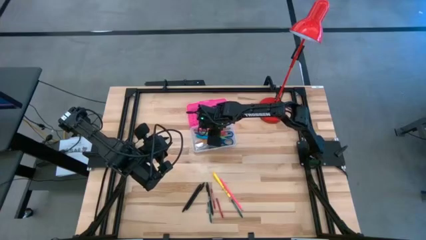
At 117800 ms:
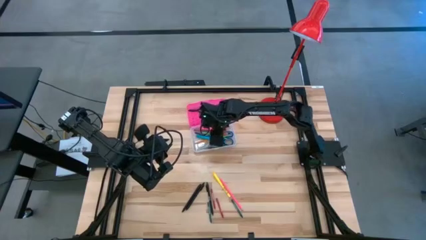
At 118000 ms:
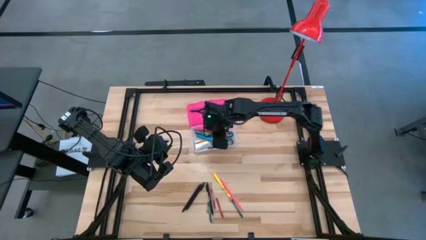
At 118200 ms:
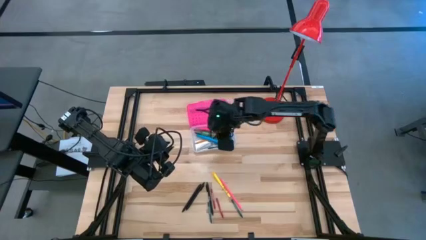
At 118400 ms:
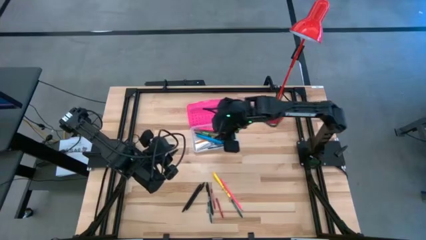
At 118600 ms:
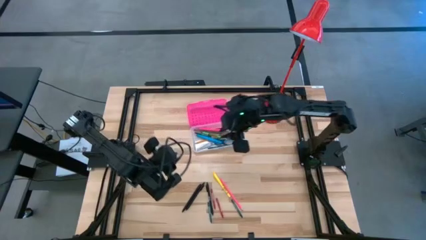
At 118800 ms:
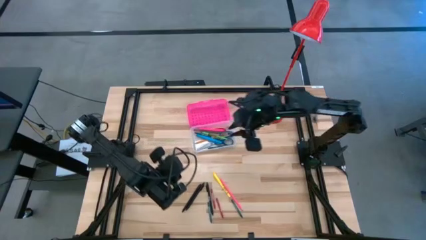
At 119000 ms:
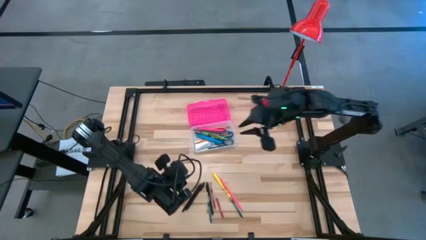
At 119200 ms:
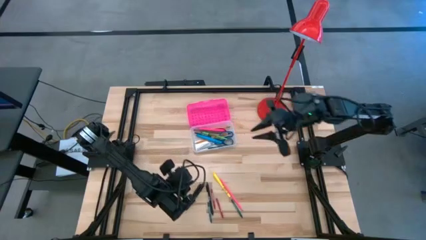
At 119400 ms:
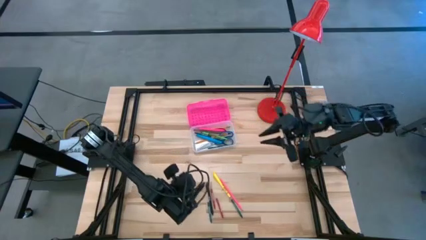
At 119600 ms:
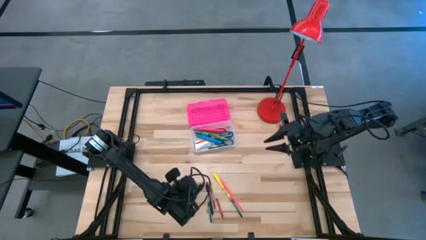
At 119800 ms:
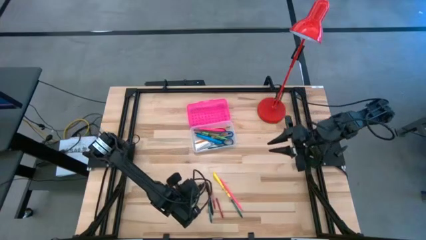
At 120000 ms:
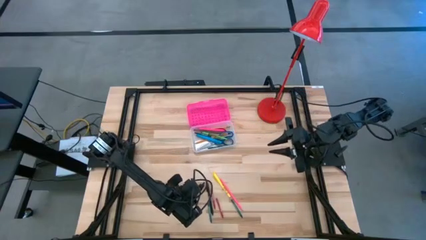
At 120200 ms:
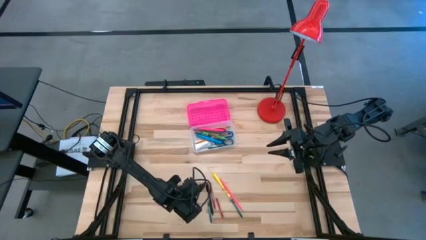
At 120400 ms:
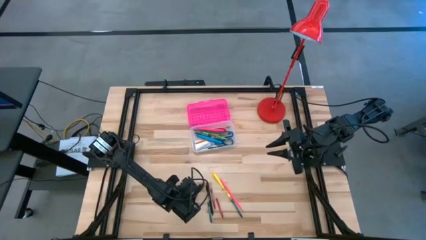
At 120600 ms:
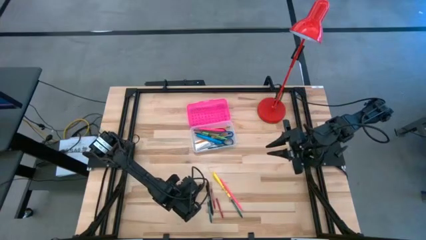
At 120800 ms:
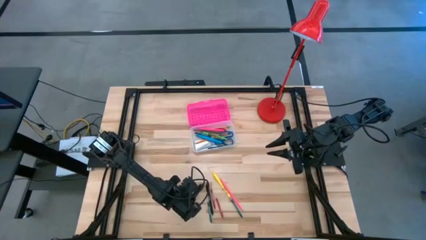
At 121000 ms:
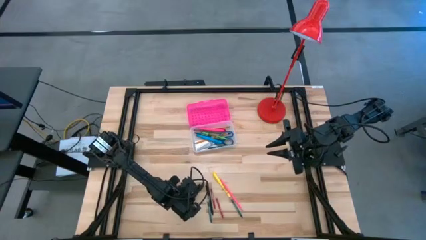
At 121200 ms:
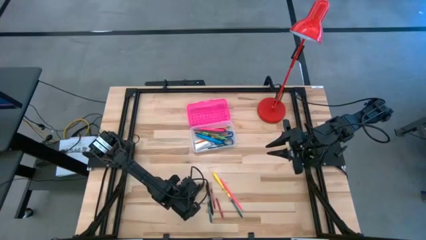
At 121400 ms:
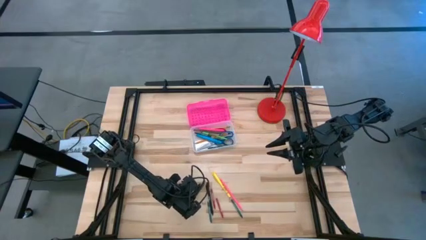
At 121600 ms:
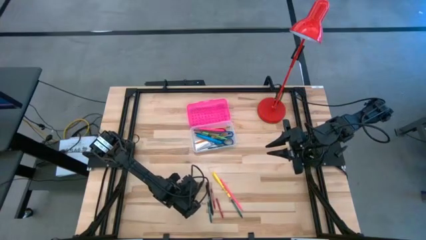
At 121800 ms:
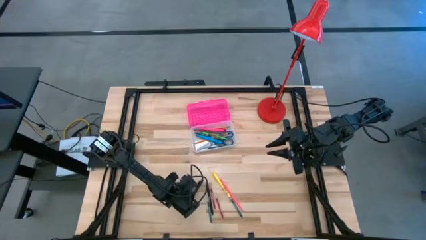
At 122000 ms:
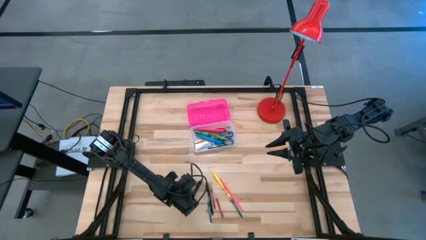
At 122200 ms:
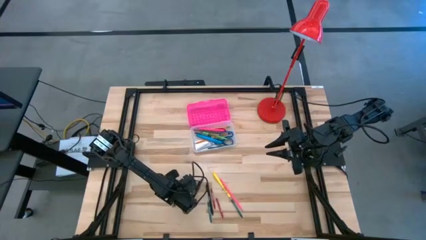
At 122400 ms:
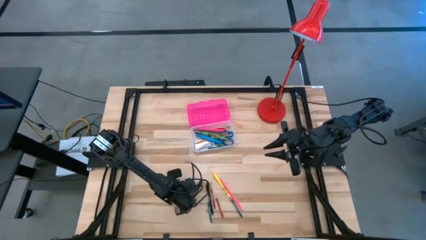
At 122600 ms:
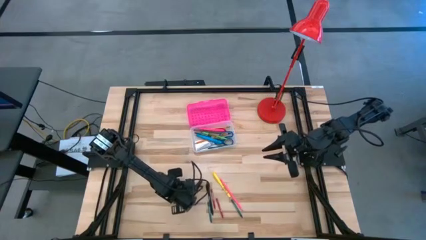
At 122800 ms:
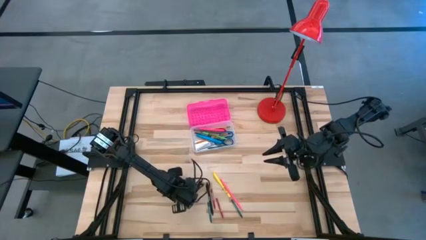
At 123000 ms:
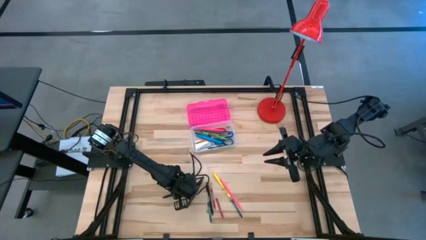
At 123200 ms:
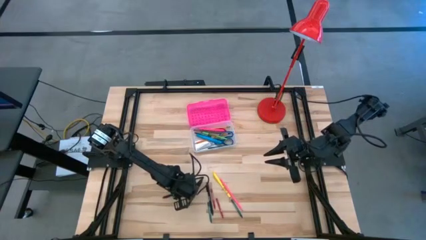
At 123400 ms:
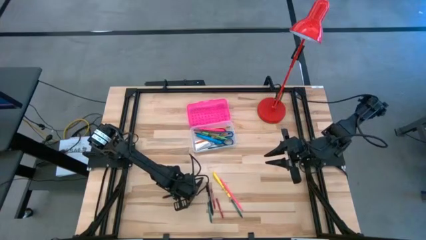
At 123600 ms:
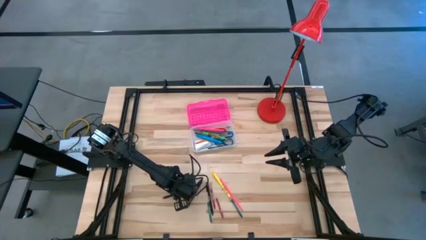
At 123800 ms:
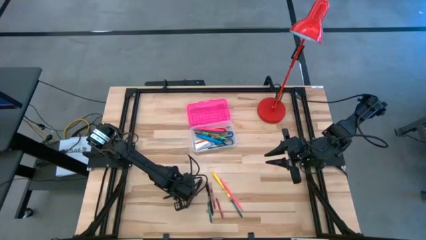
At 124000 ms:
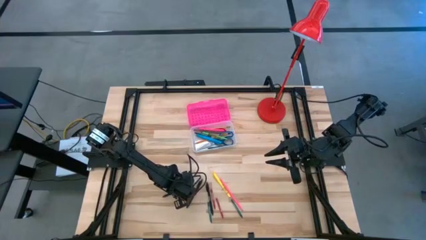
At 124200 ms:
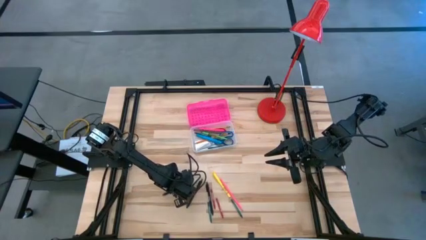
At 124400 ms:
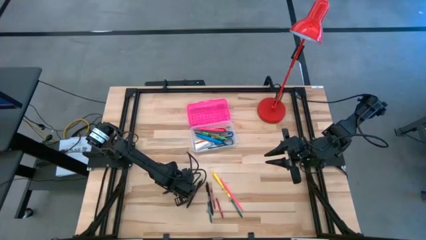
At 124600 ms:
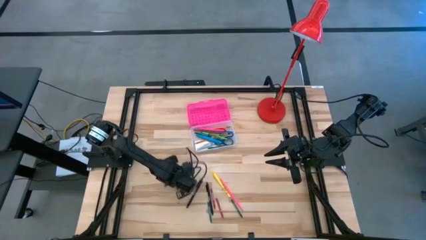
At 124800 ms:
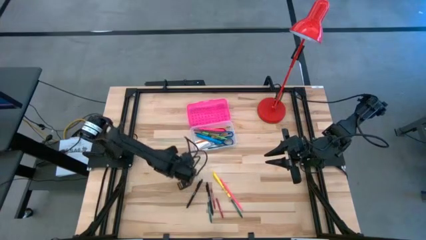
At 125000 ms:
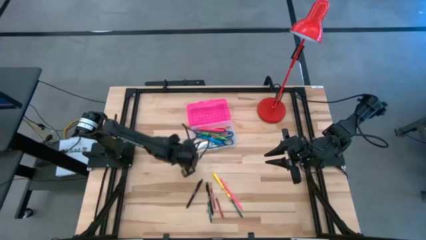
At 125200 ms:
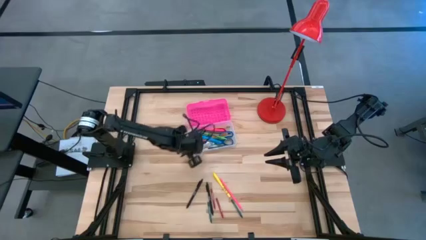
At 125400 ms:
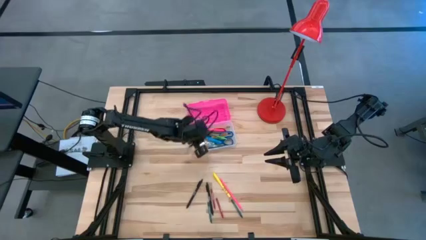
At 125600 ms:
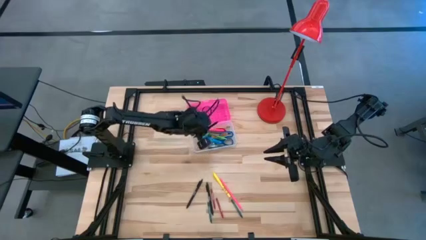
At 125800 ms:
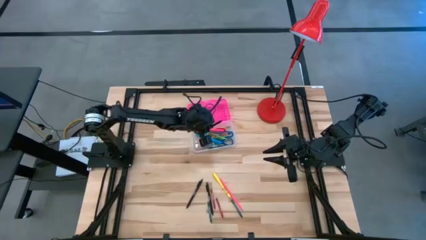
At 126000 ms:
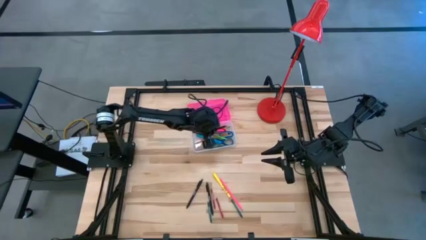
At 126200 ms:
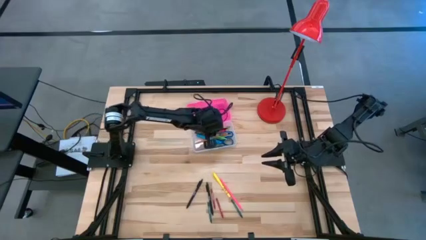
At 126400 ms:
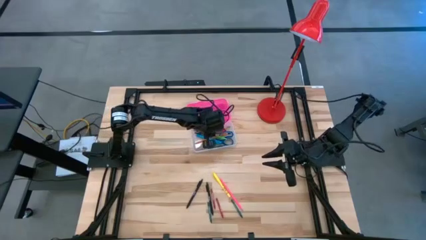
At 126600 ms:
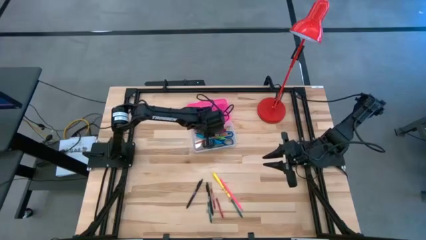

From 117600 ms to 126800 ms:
Task: Pick & place school supplies into a supply box
Put the black pen into the pink supply box

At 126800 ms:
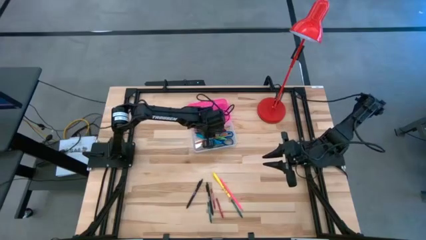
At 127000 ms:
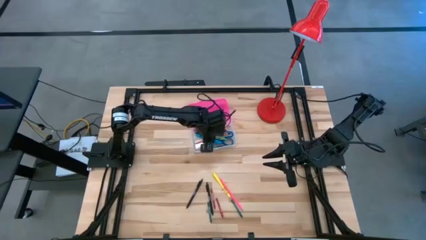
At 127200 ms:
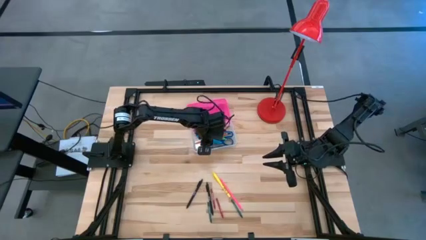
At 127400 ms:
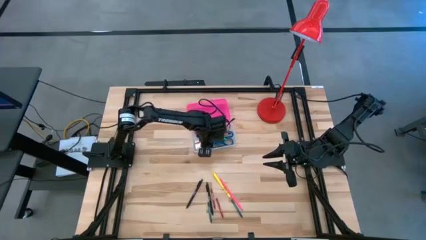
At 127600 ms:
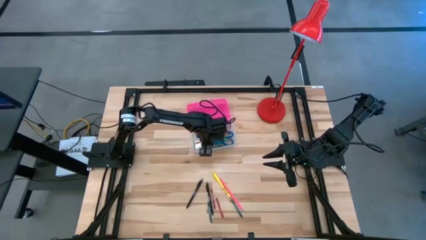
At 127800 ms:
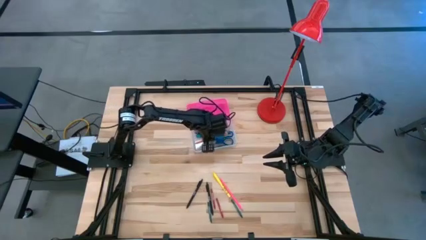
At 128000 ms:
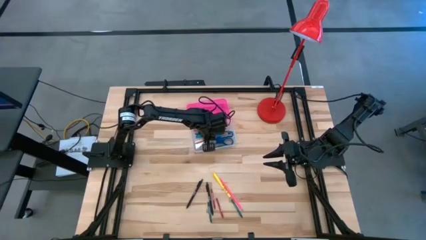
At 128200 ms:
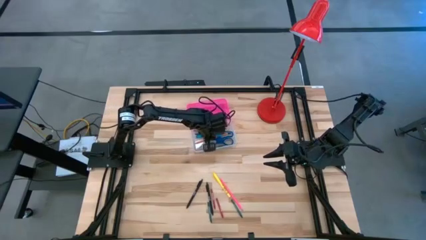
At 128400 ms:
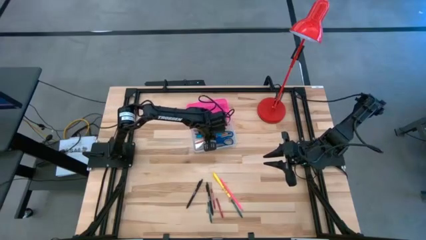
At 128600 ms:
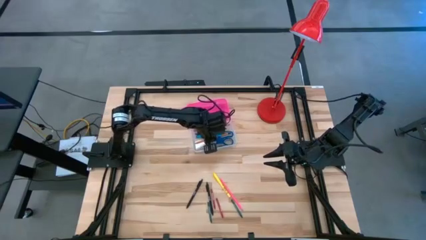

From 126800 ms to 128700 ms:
Adjust the pens

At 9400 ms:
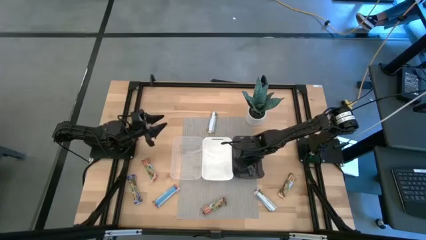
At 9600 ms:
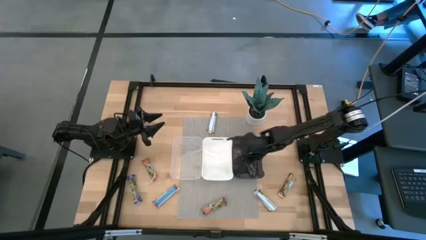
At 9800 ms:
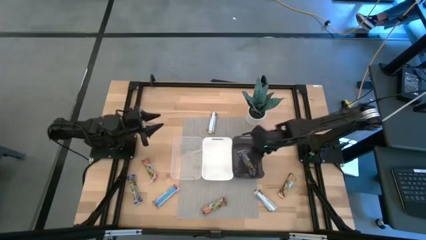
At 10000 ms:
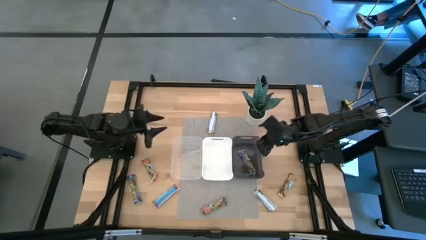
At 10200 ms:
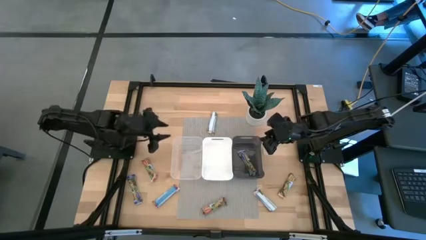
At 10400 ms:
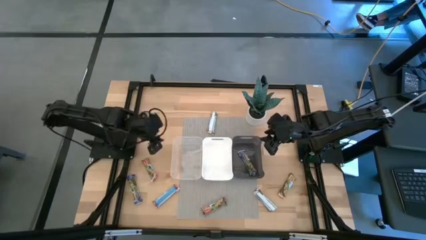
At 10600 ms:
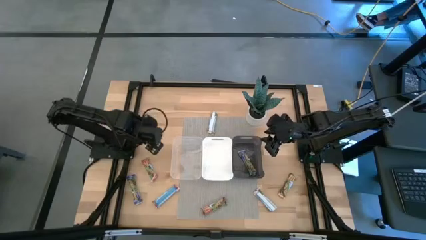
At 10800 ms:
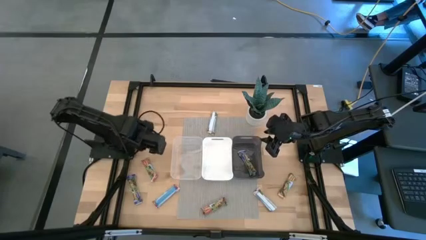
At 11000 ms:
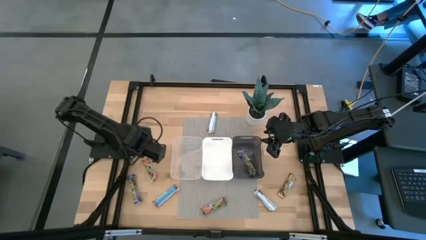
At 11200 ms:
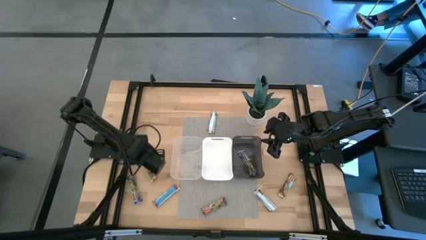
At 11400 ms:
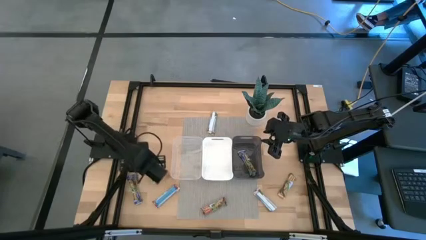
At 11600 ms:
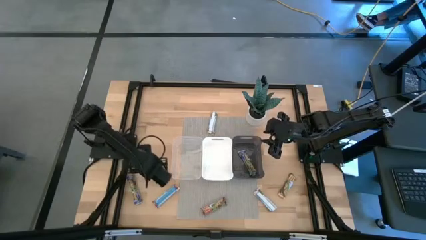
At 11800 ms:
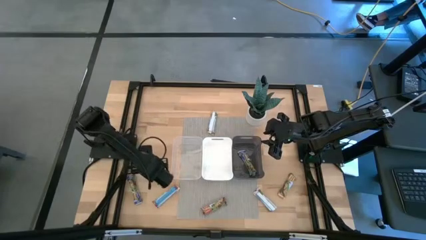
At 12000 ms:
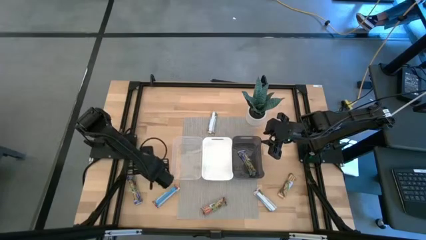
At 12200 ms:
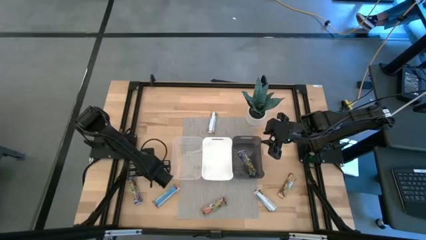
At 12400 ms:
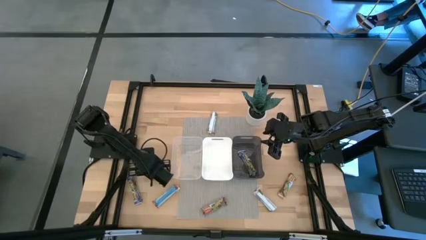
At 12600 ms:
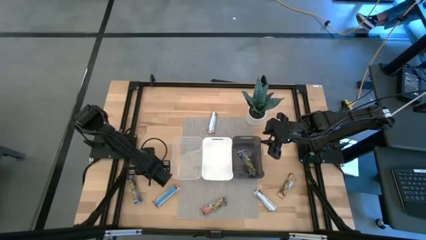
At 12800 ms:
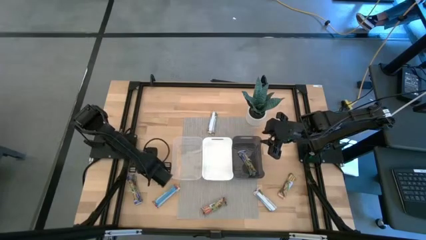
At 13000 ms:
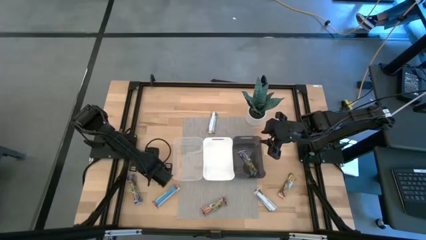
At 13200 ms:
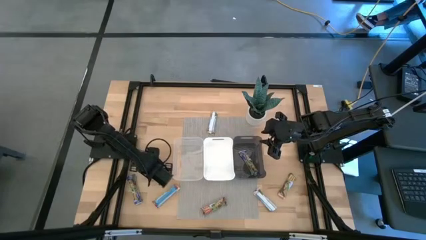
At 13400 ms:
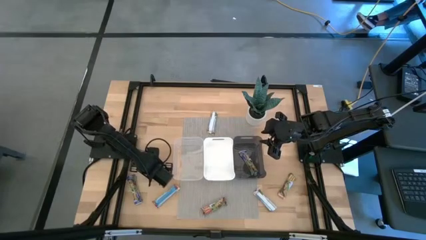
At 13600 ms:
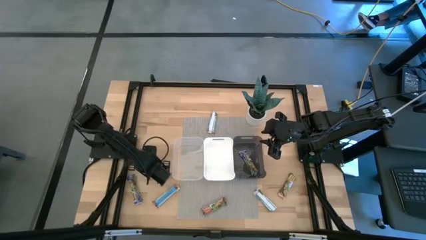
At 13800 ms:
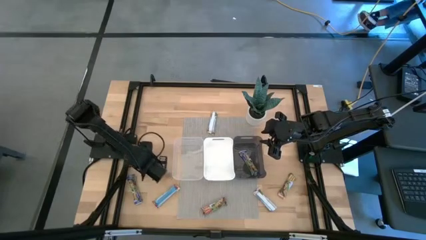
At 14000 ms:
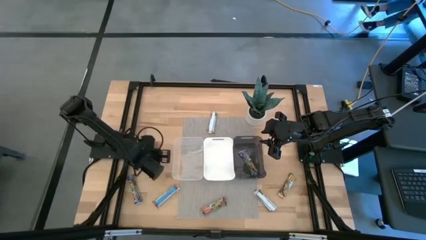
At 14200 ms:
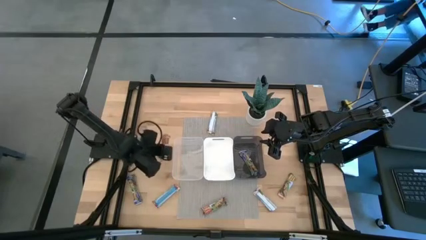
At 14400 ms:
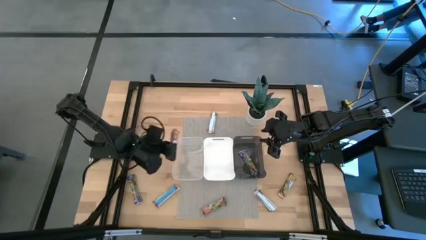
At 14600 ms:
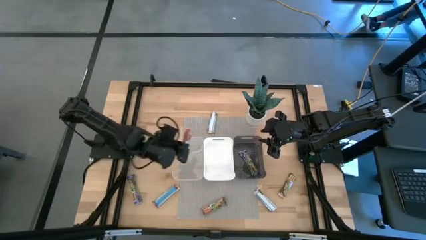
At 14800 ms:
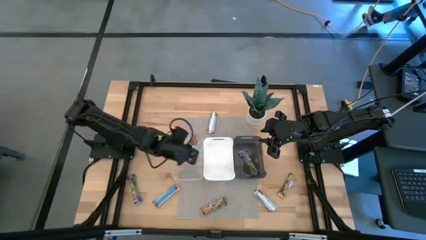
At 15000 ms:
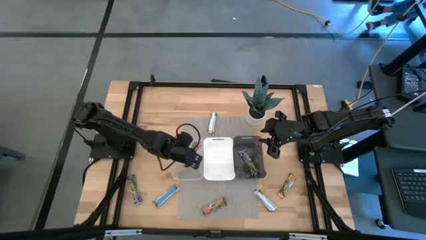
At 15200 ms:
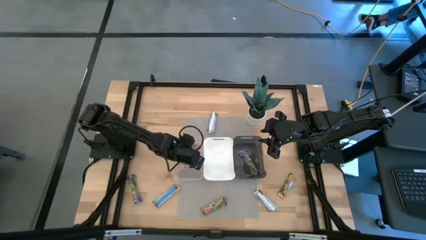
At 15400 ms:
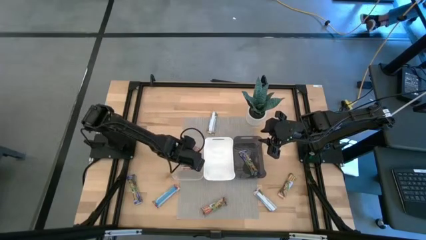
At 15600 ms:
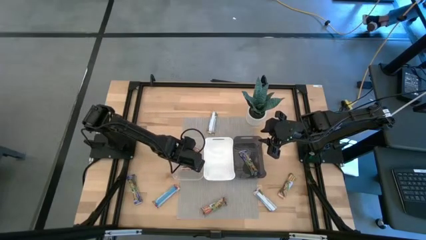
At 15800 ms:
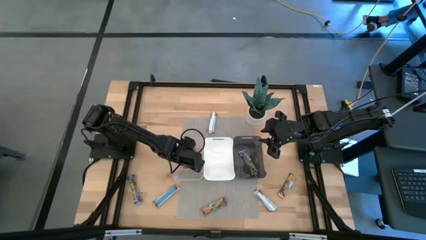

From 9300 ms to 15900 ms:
Task: Pick and place Granola Bars by type
Put the top left red granola bar into the transparent bin
